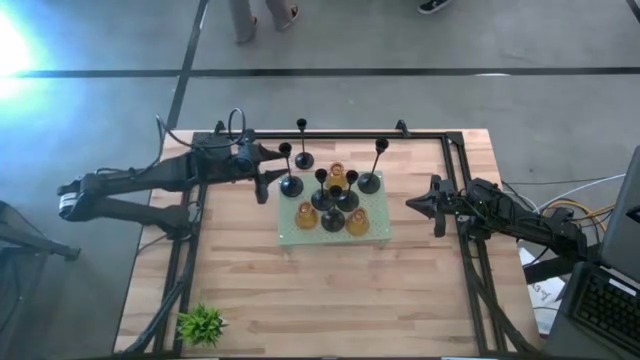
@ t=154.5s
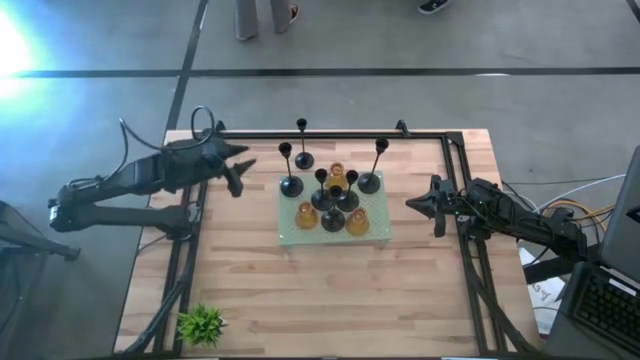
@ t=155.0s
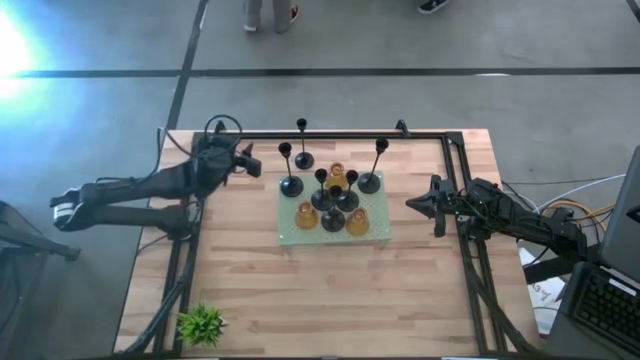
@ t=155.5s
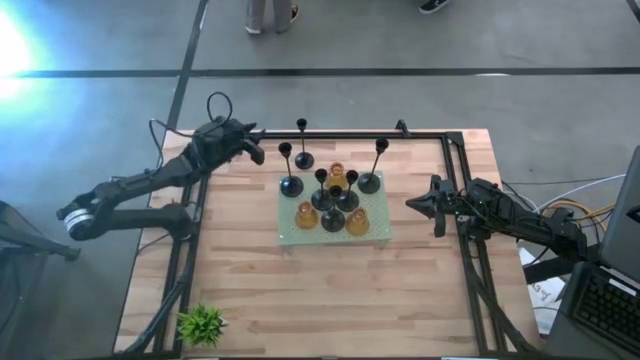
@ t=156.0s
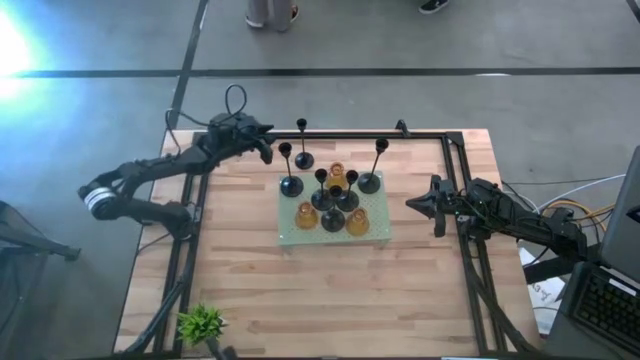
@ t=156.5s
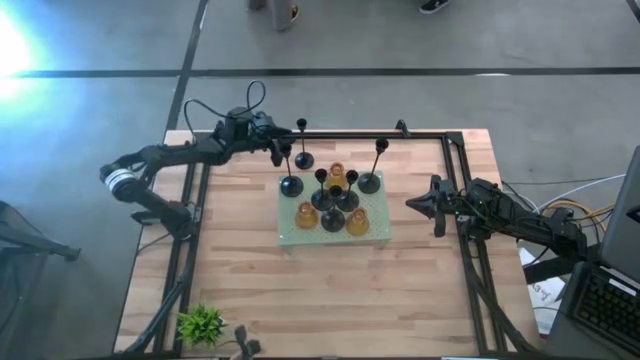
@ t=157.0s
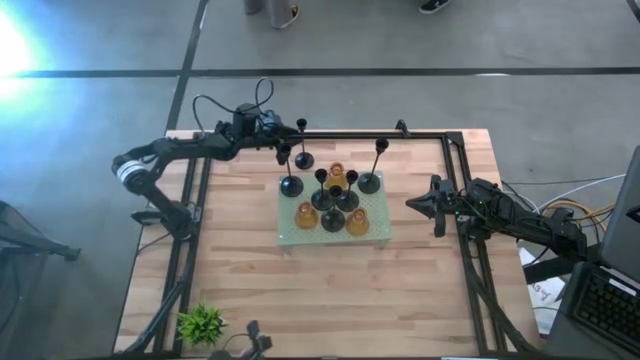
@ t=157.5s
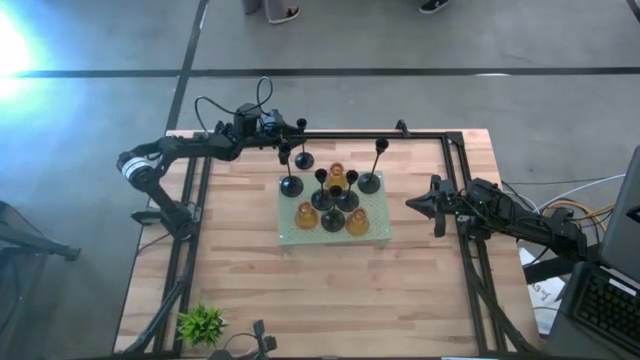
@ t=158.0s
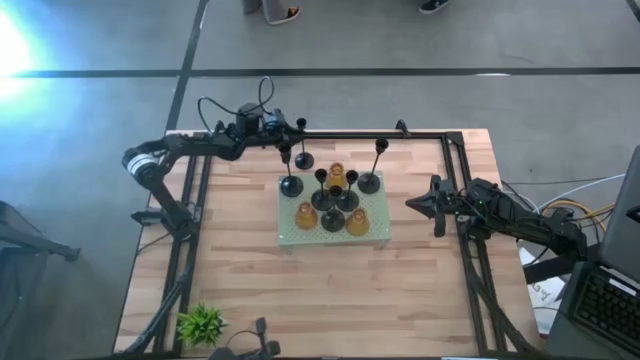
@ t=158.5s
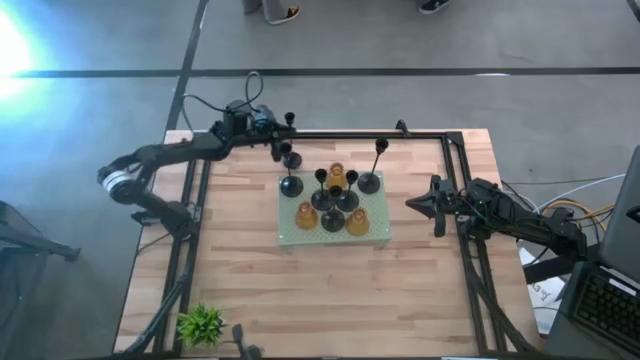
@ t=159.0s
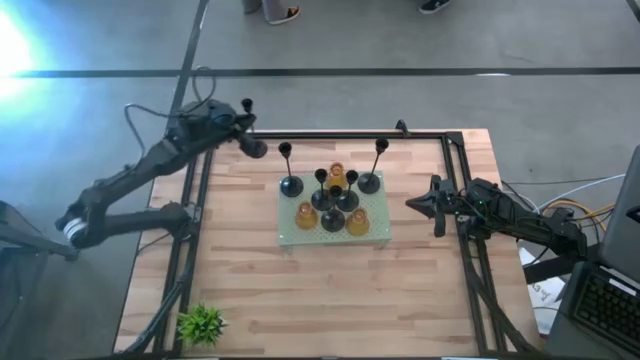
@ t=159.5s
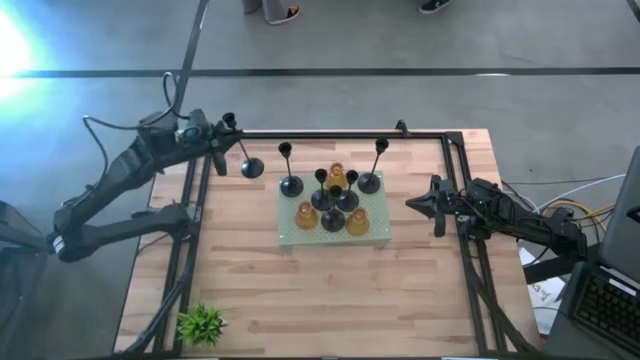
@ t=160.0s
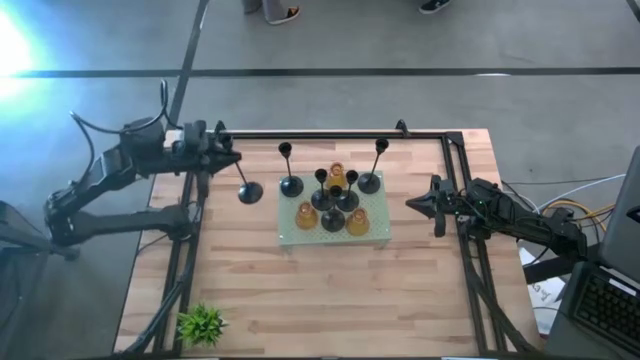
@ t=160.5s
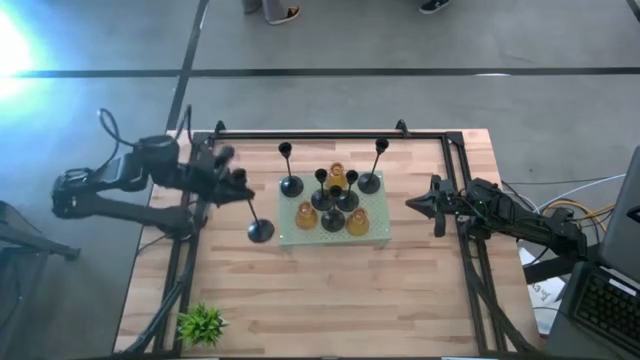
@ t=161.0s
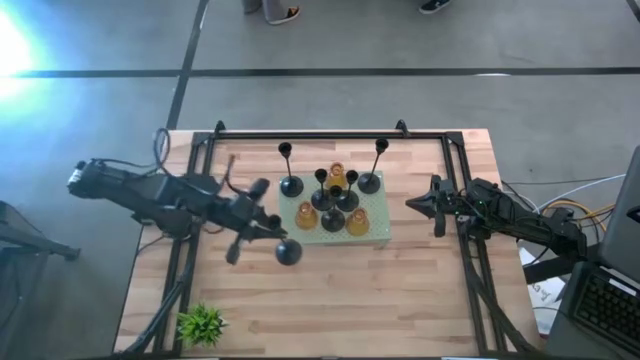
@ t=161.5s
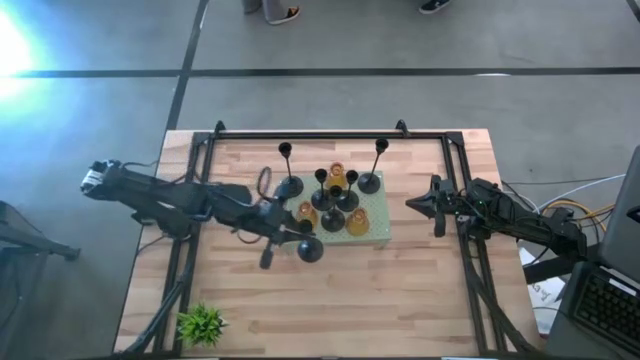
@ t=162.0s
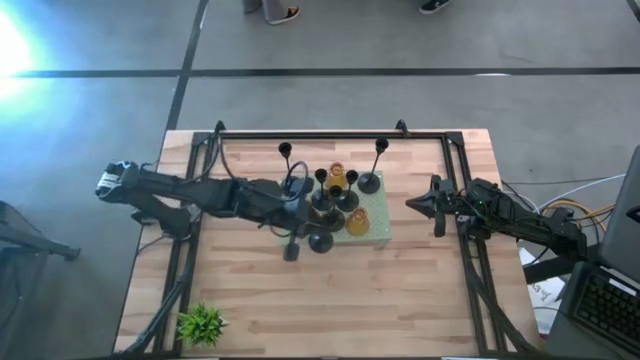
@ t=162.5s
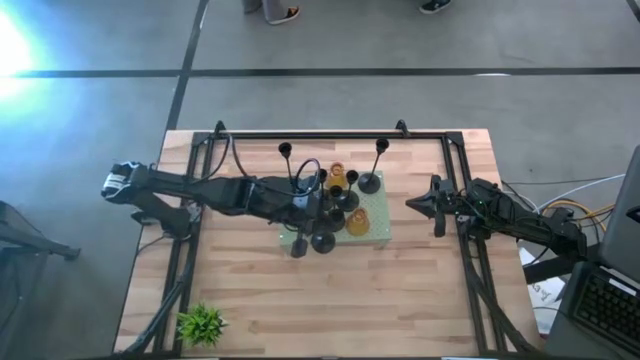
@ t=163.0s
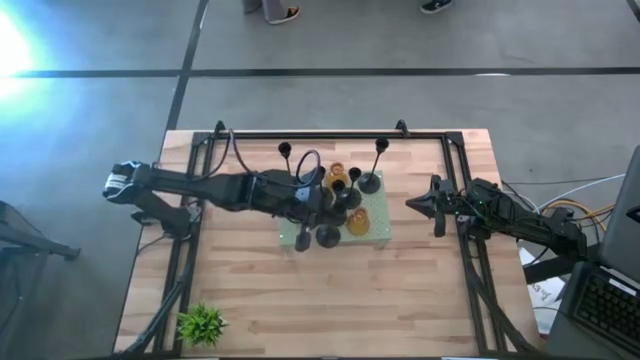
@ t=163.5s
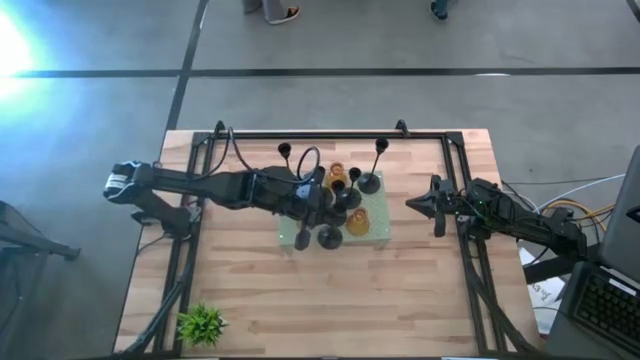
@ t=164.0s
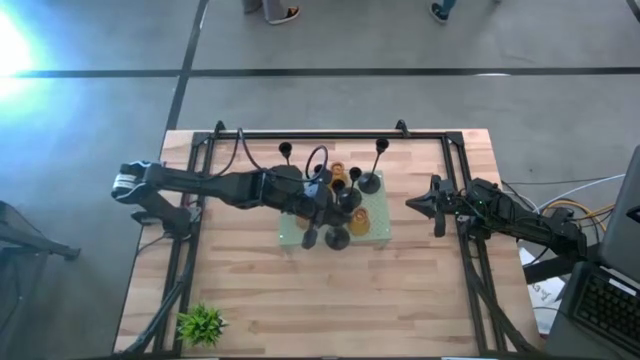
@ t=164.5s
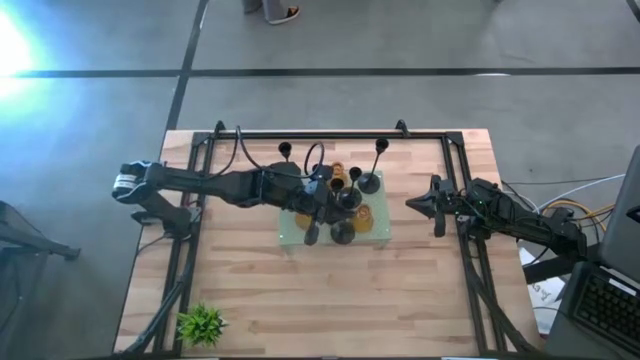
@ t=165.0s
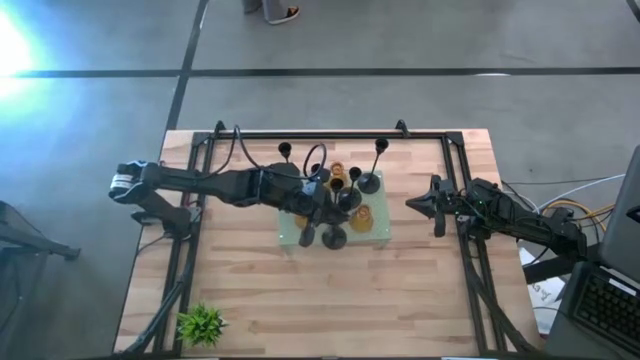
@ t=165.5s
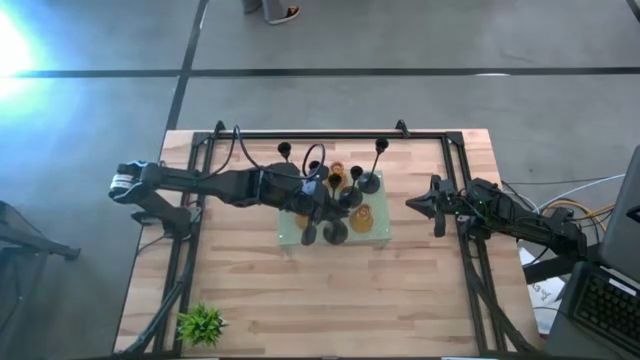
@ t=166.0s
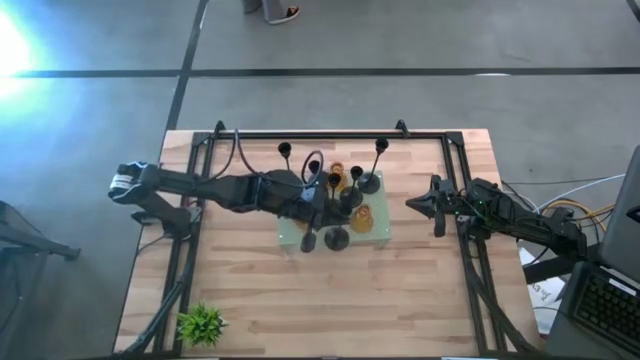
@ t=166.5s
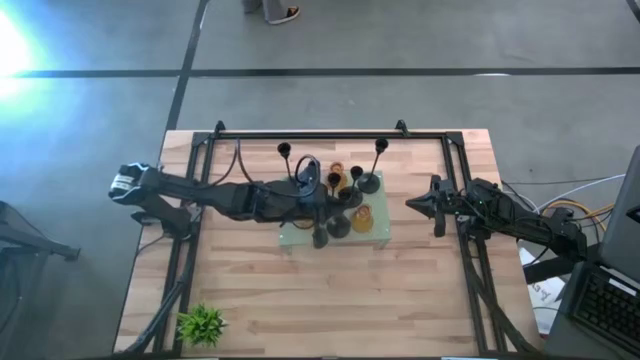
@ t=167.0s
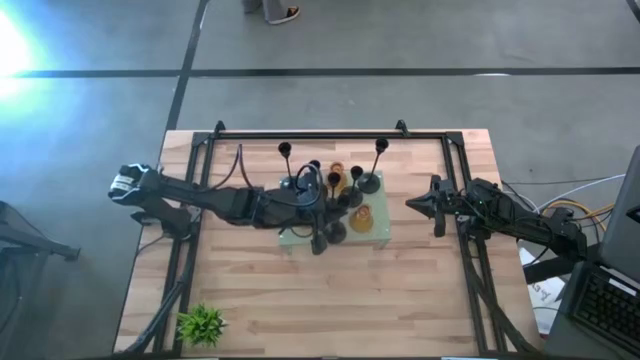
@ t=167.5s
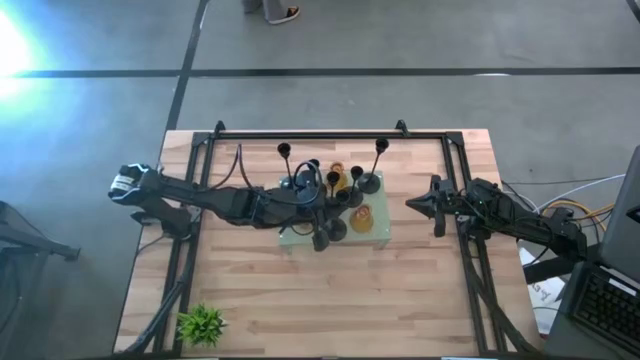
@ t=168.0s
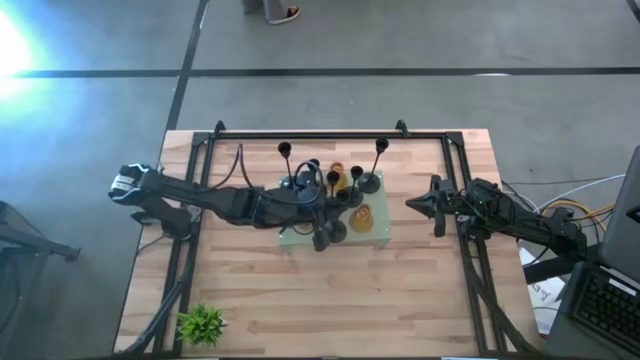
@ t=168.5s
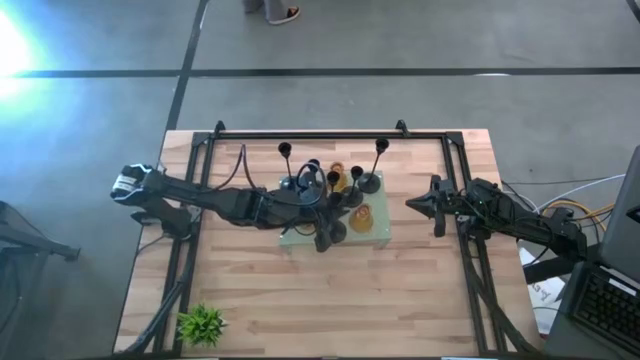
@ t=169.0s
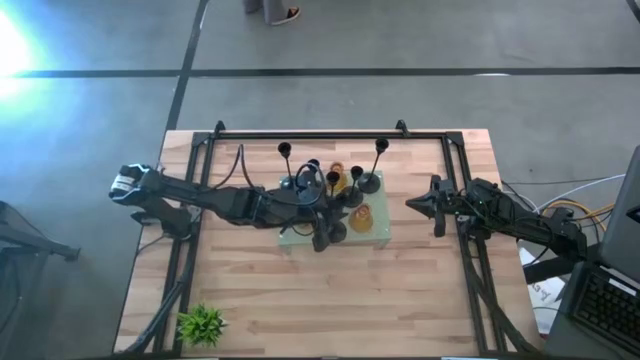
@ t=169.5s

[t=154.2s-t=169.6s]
Task: Pick & Place candle stick holders
Put the black candle holder on the shelf

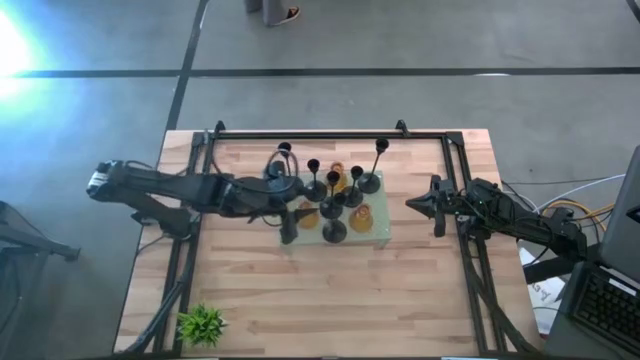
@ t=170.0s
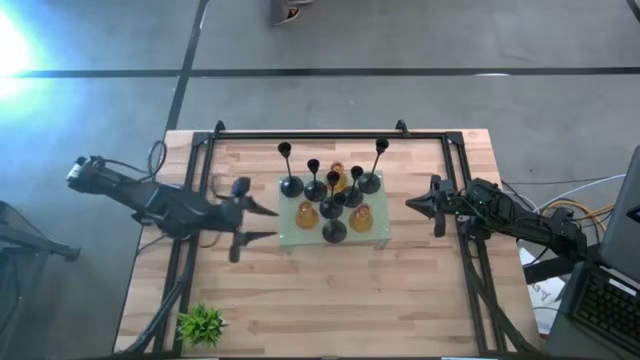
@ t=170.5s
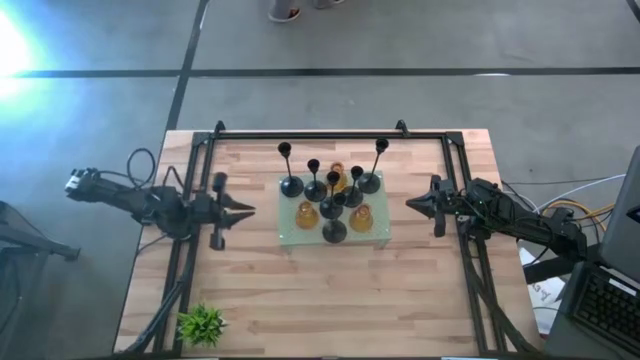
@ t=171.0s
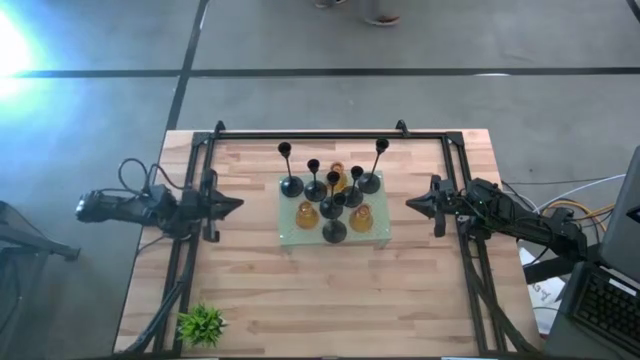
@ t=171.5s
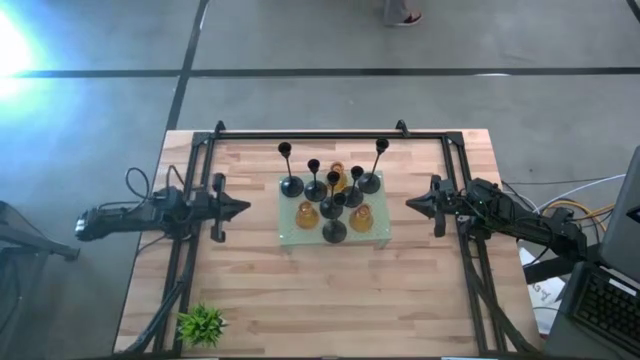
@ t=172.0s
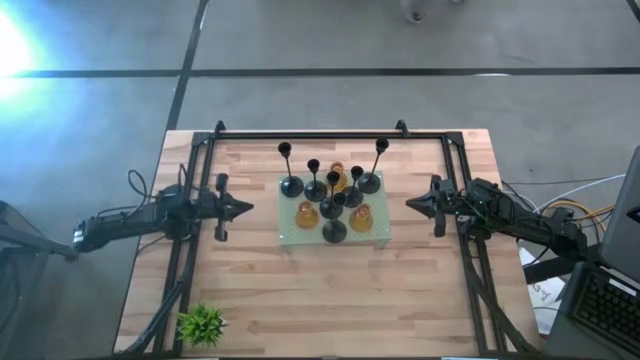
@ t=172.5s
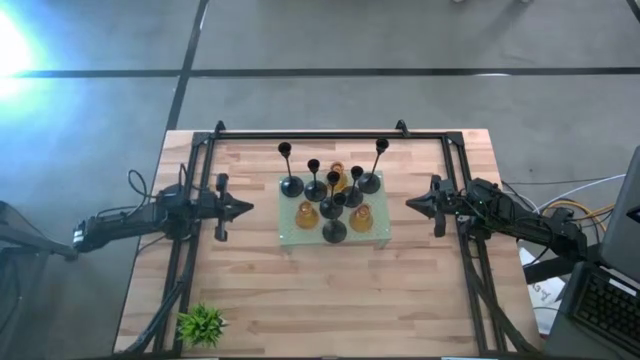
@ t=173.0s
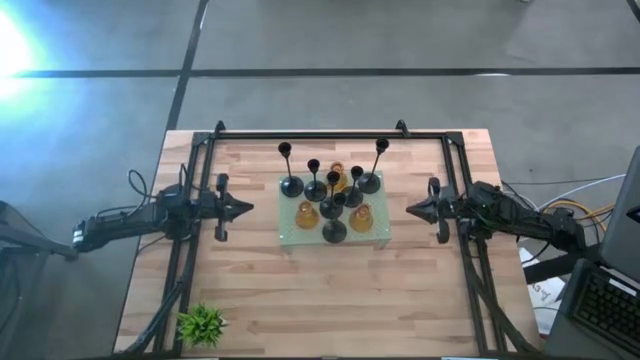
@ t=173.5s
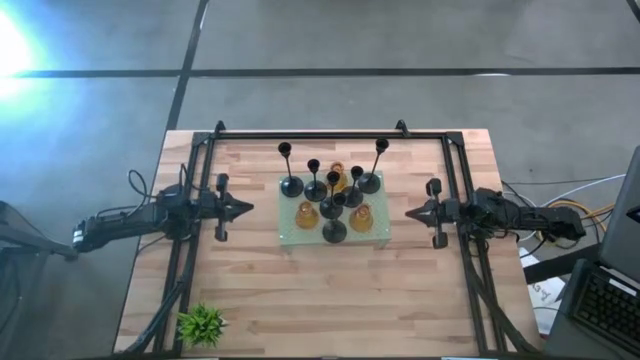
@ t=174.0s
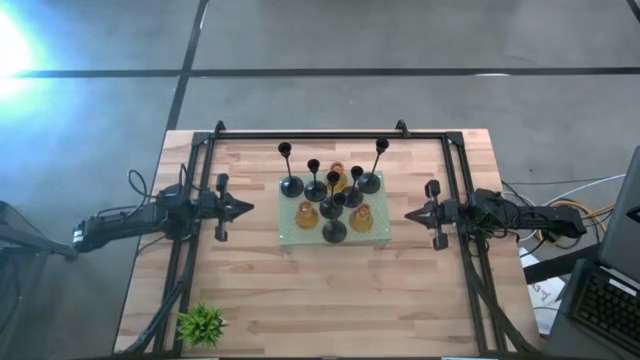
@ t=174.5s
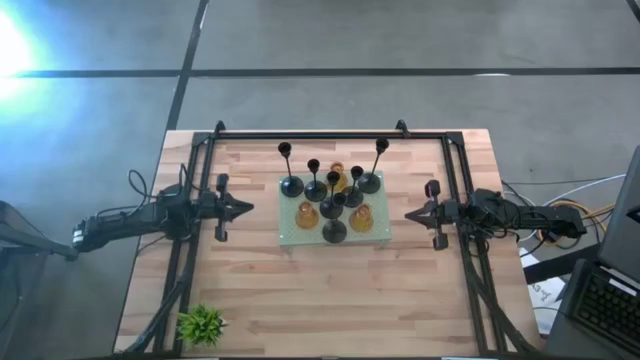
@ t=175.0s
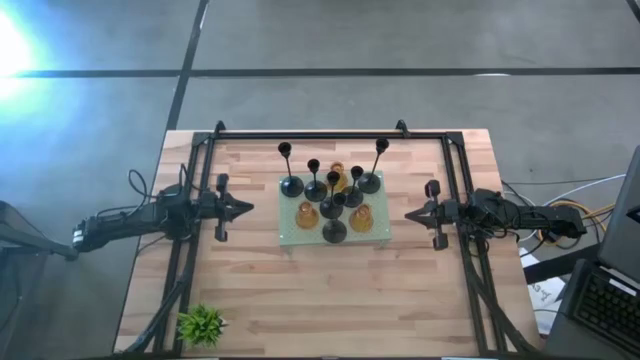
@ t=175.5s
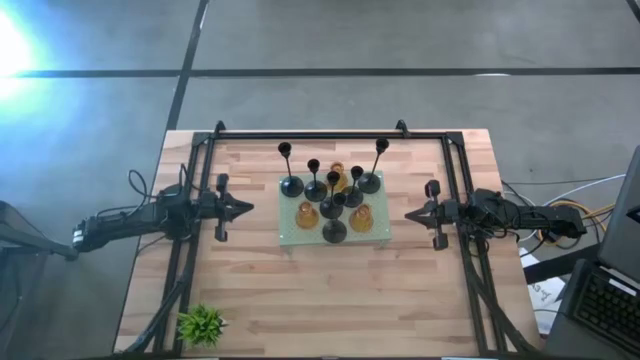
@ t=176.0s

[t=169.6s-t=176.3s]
Return to Home Position

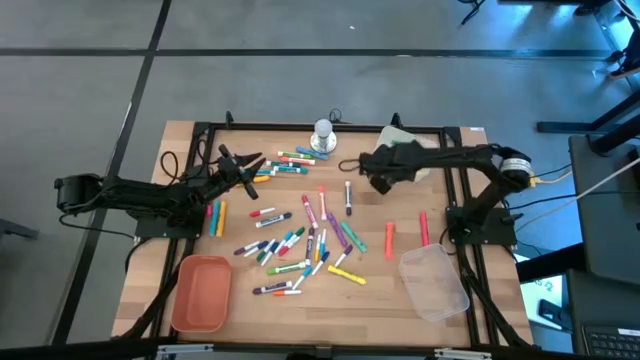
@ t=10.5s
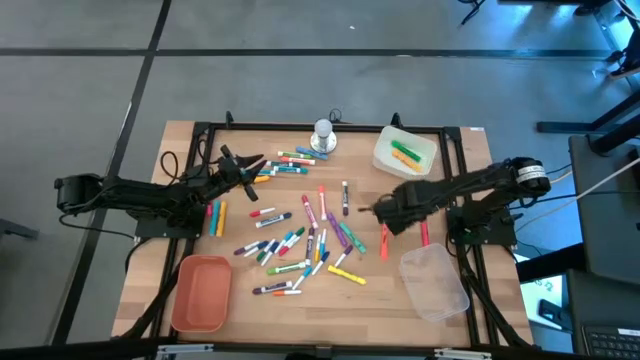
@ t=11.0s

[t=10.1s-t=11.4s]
Task: Pick & Place Markers
Put the large pink highlighter pen into the white bin
